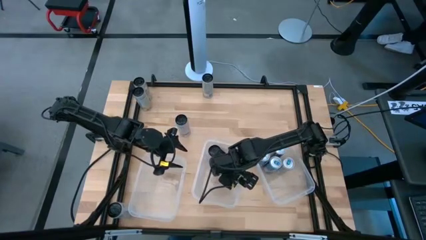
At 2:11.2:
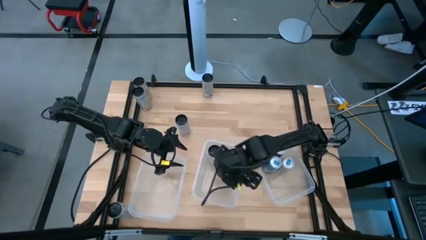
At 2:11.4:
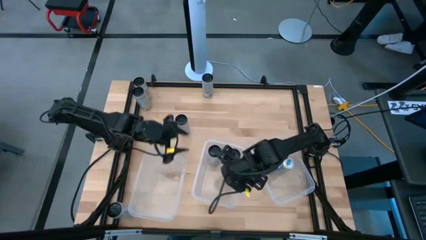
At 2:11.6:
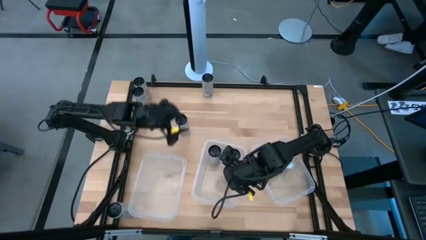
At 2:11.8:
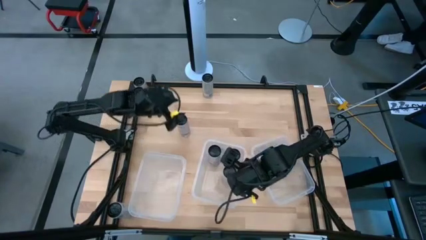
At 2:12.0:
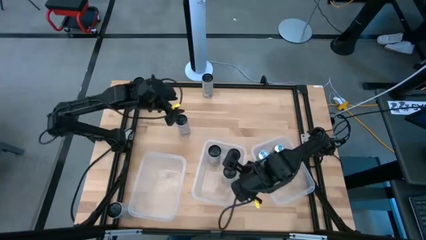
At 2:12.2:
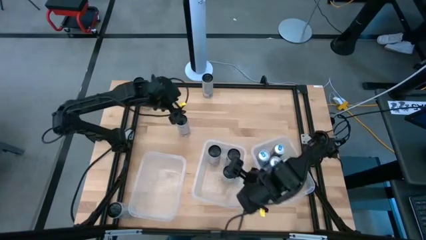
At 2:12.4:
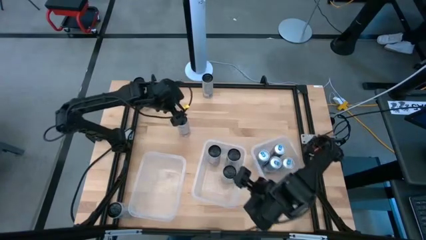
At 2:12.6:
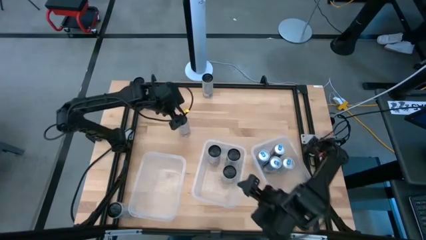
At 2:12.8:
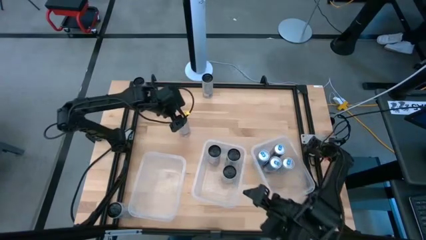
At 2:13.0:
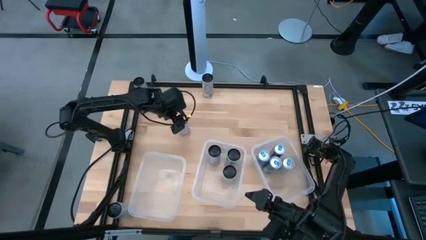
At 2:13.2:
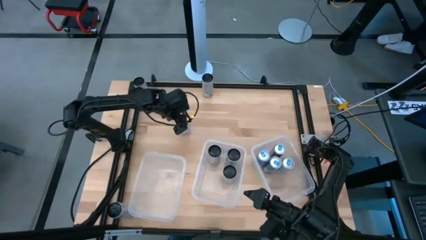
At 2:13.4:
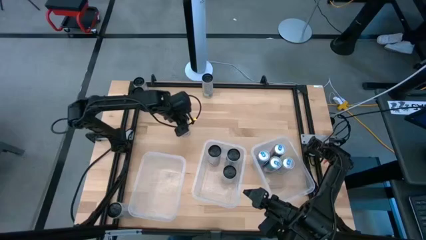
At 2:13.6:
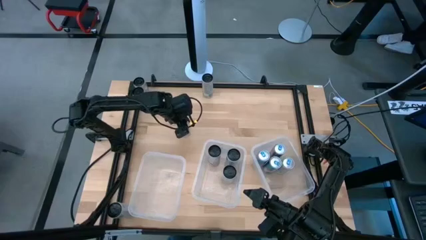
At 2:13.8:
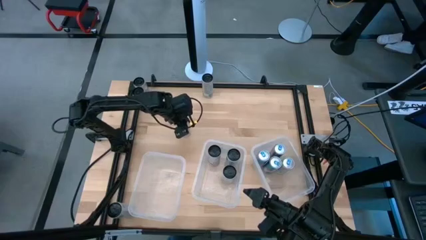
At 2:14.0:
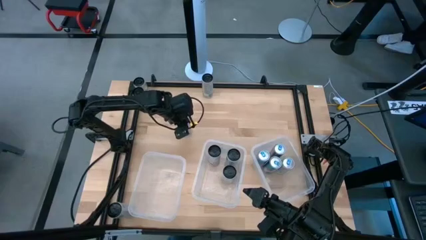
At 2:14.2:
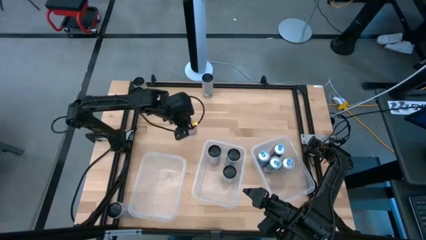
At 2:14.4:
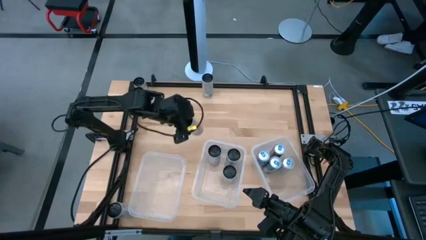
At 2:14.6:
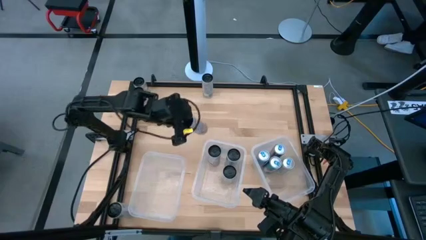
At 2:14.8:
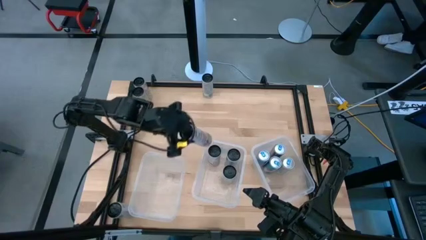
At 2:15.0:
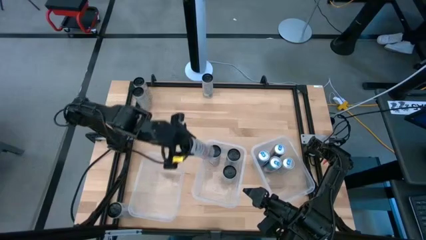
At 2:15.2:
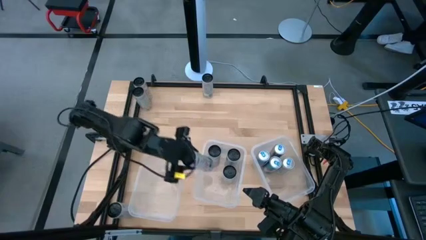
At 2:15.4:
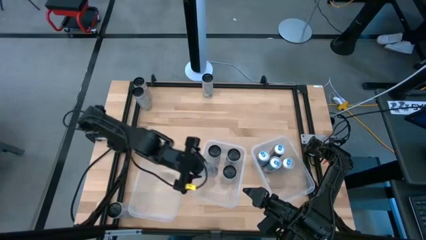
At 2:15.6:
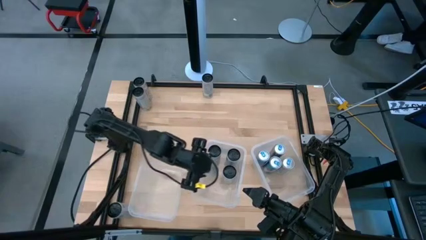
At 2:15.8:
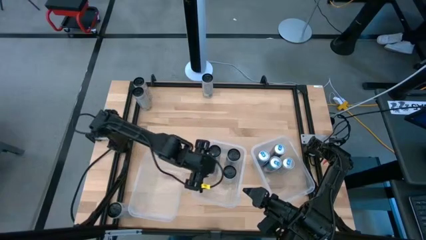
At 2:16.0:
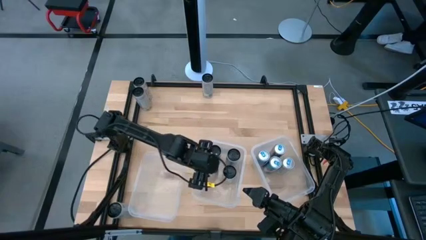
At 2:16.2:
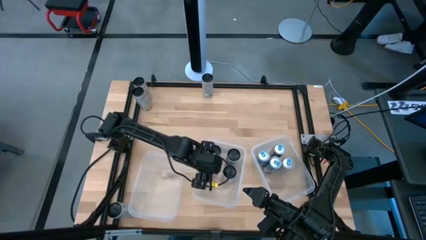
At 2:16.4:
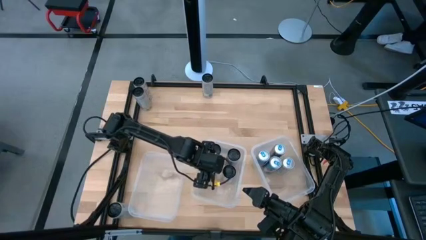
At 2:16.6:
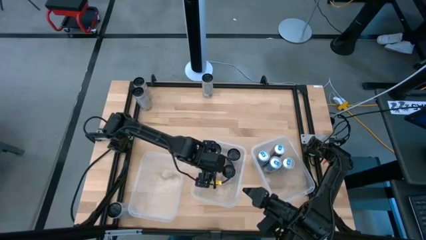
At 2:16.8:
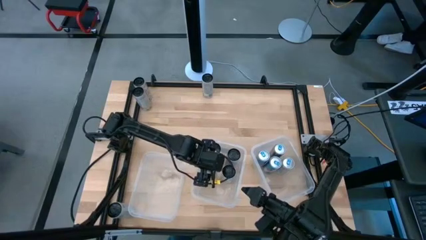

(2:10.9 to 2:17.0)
Task: Sort soda cans
Put the white-pink soda can into the middle transparent bin

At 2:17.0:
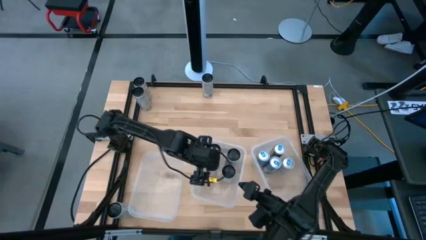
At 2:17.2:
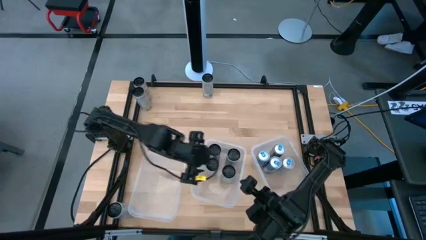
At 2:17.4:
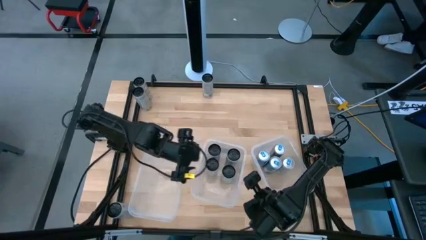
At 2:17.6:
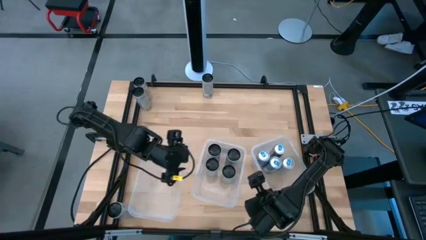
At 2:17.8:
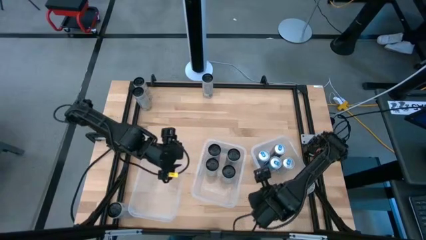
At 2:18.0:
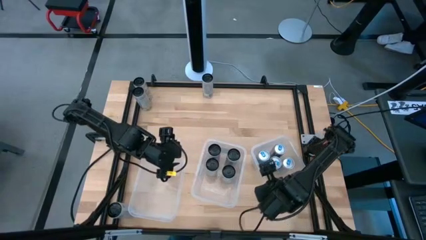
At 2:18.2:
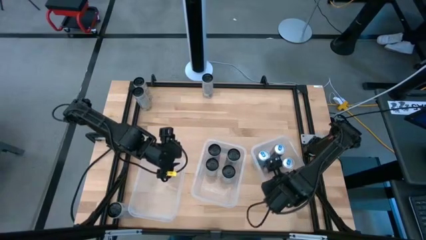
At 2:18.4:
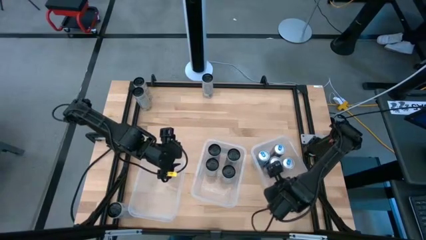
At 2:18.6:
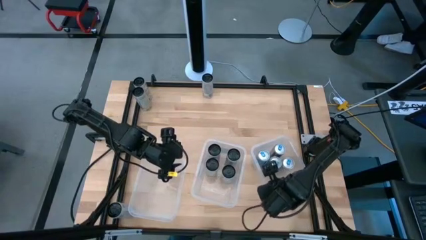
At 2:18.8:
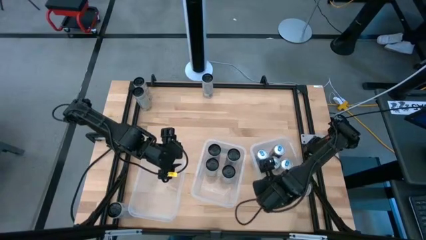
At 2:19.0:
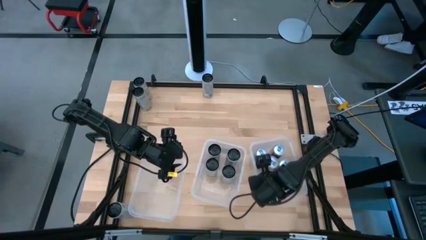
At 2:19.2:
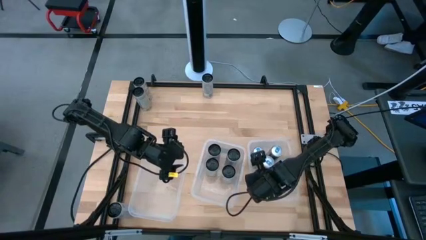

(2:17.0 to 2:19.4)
Adjust the right transparent bin

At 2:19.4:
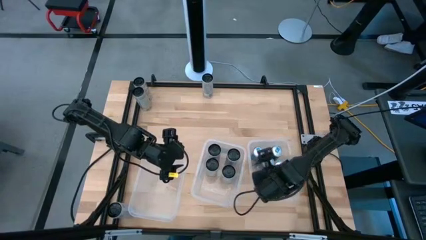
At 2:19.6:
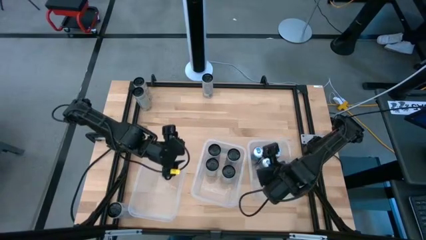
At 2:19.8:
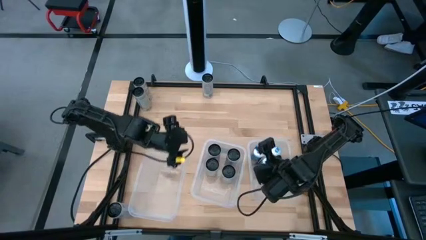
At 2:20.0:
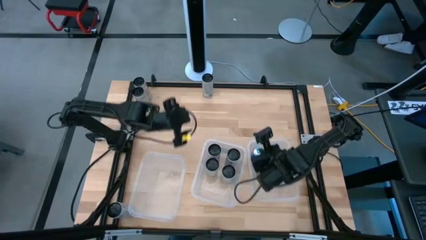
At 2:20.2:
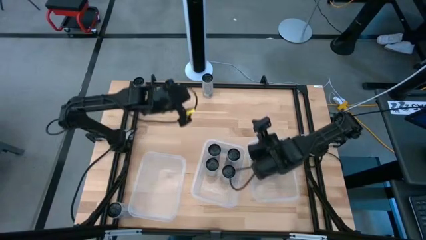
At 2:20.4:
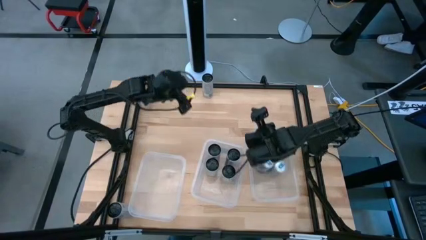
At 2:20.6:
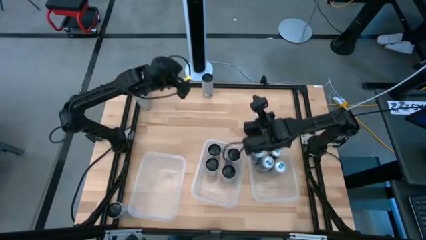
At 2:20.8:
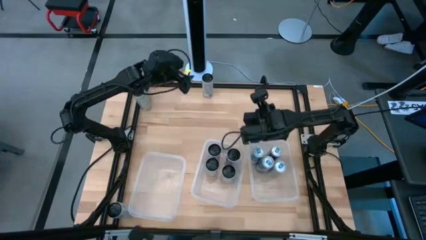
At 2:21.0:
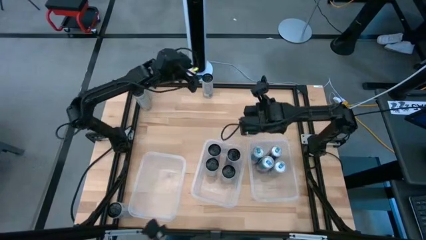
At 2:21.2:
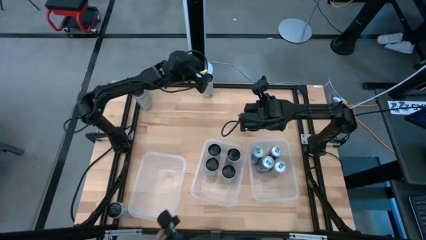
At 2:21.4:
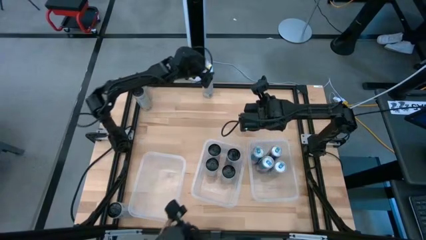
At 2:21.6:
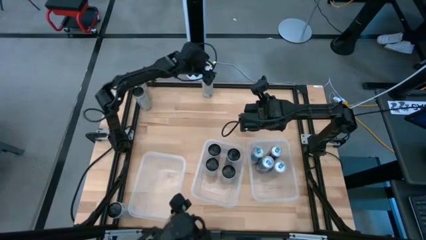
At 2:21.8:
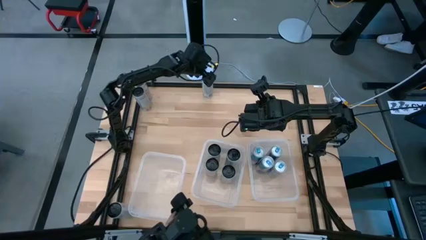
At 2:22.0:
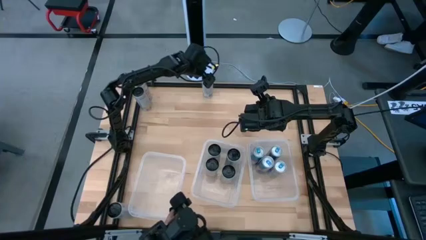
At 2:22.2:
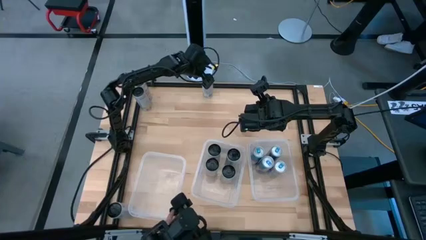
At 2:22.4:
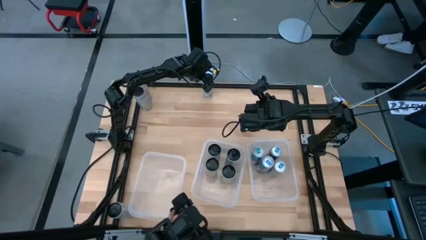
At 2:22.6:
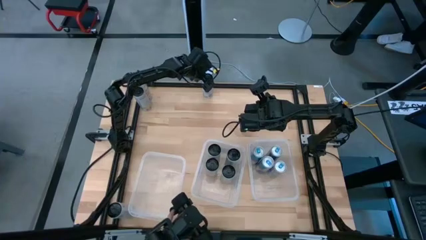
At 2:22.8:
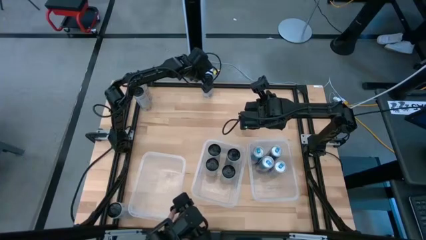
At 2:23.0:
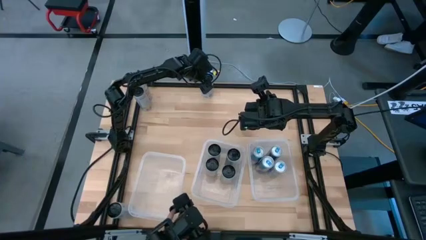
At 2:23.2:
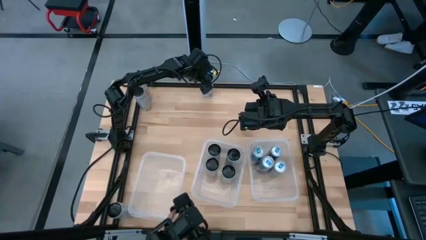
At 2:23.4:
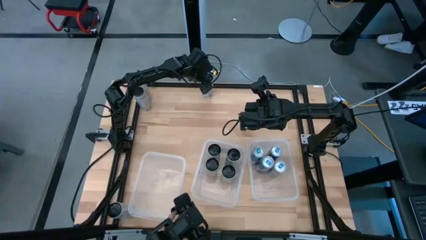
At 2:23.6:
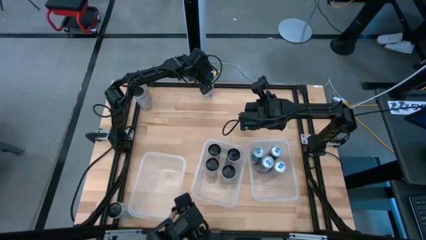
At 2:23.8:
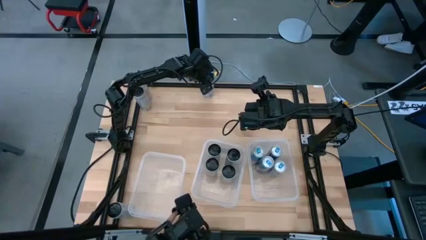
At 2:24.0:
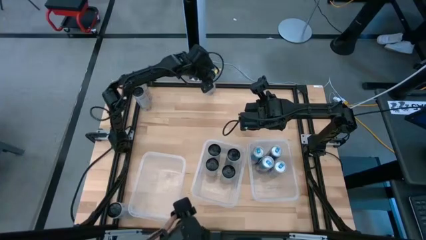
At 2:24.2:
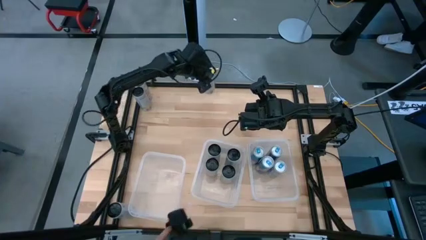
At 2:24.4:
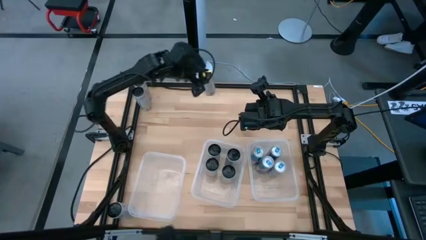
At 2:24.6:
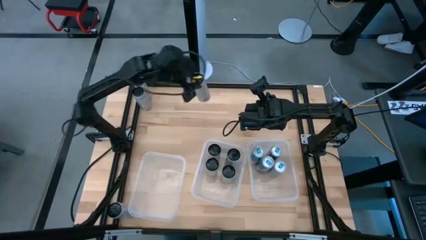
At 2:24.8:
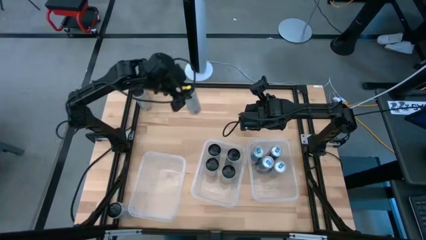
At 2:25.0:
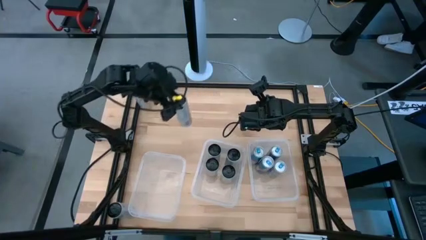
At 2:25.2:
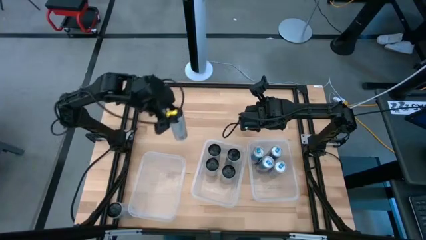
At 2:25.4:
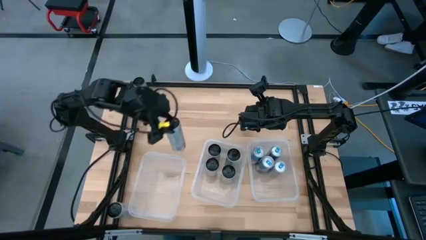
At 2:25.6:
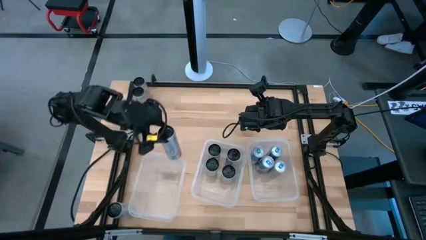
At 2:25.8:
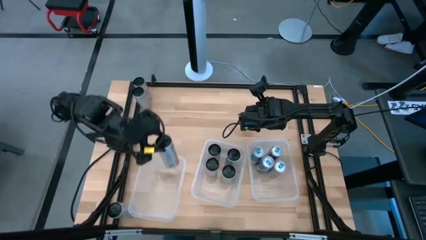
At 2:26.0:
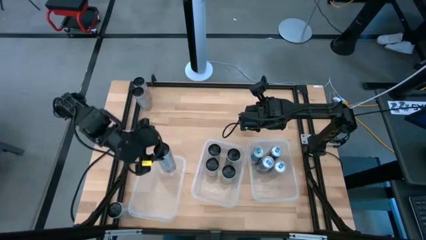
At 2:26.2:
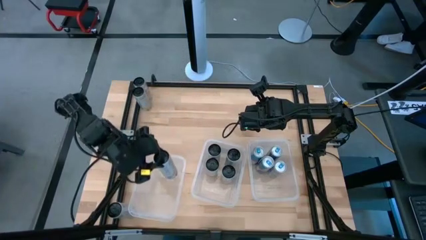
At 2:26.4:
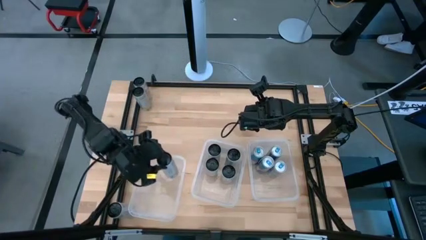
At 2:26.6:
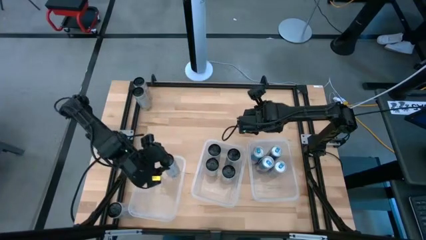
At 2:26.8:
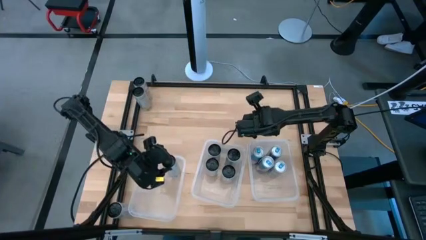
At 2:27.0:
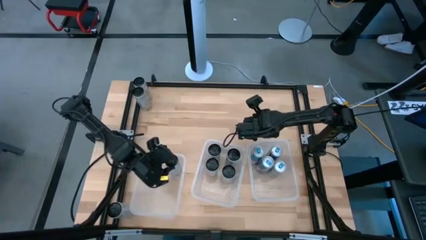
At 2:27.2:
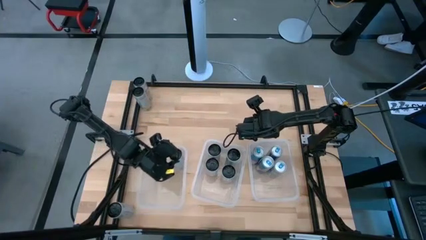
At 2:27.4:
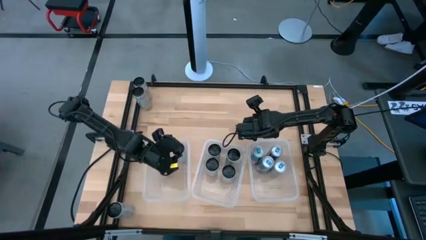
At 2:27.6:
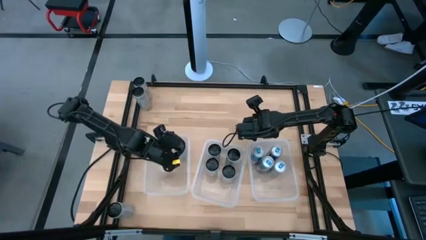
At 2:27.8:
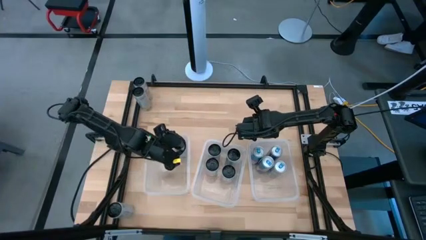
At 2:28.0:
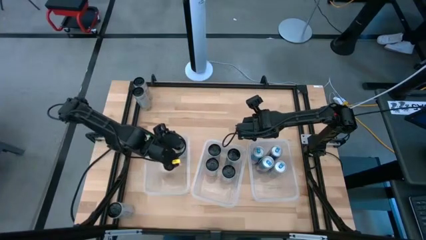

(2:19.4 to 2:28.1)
Put the top right white-yellow soda can into the left transparent bin
